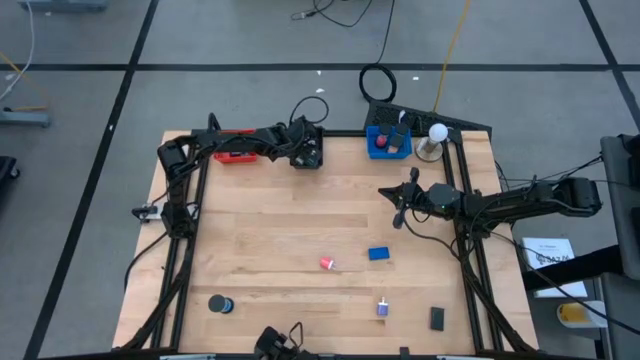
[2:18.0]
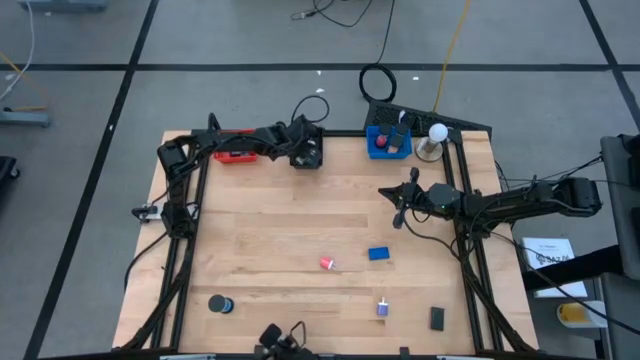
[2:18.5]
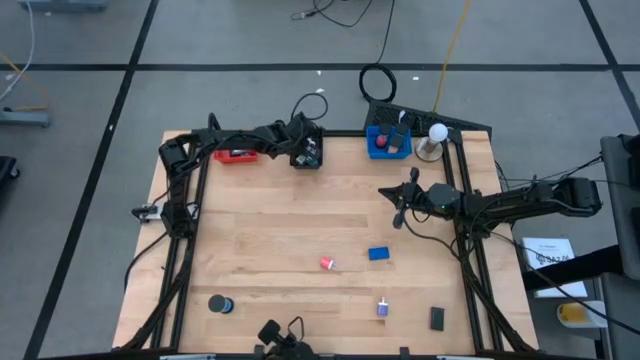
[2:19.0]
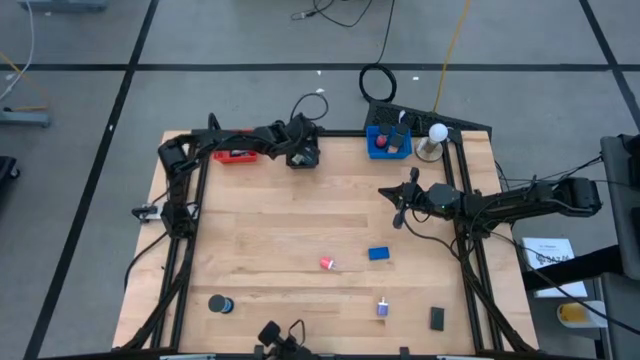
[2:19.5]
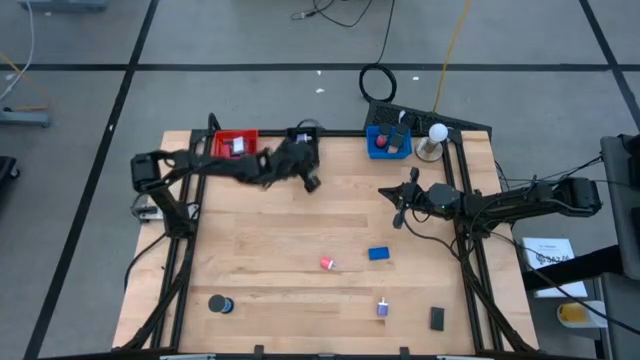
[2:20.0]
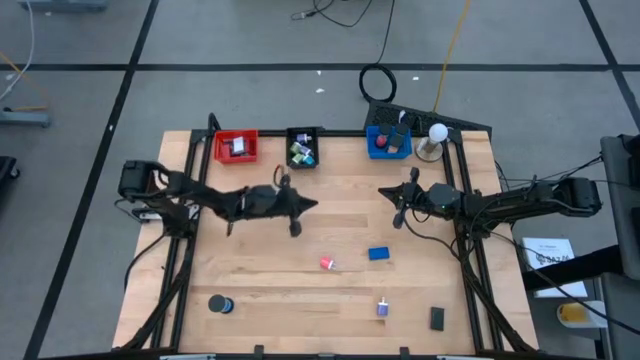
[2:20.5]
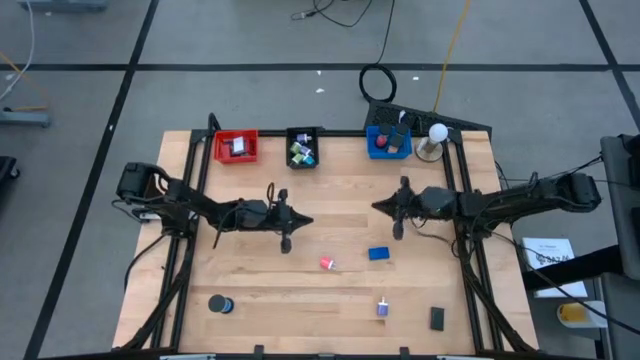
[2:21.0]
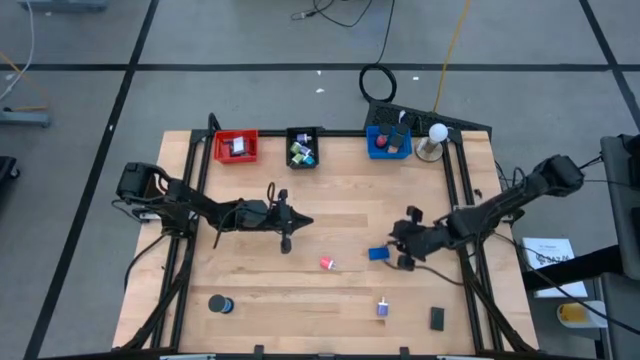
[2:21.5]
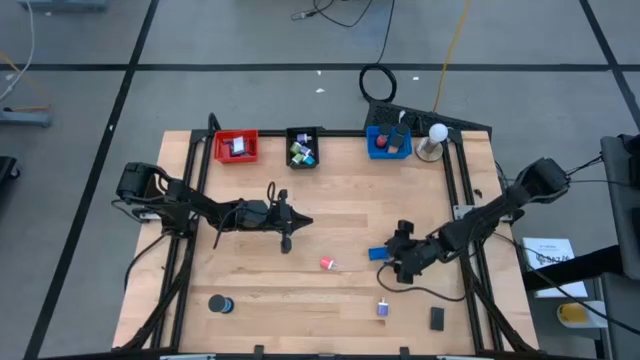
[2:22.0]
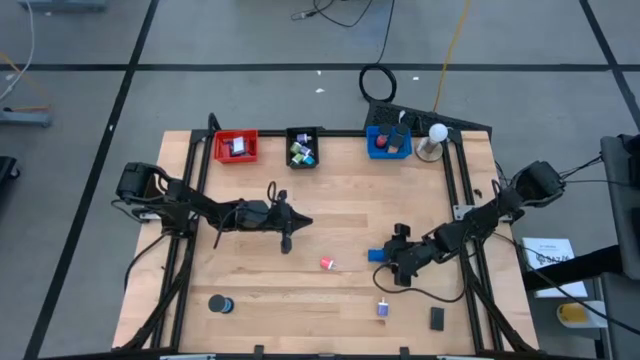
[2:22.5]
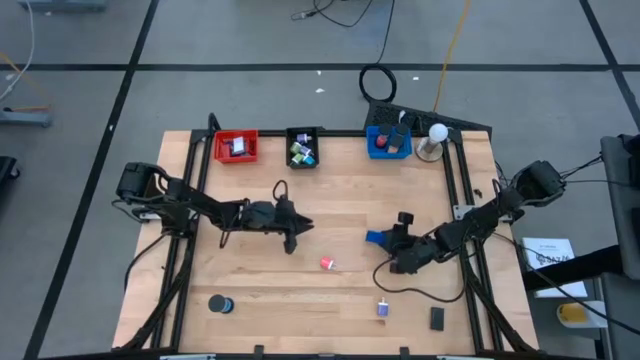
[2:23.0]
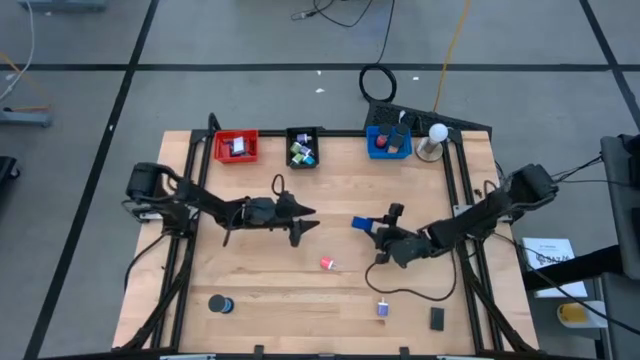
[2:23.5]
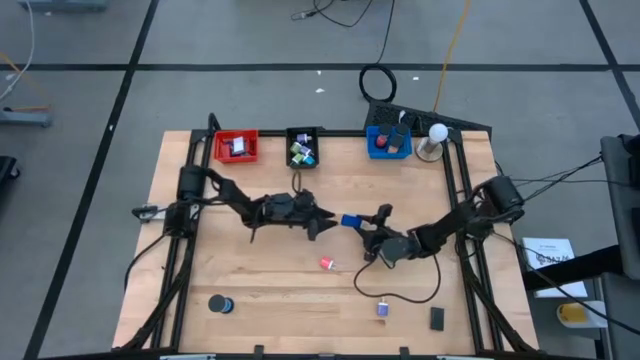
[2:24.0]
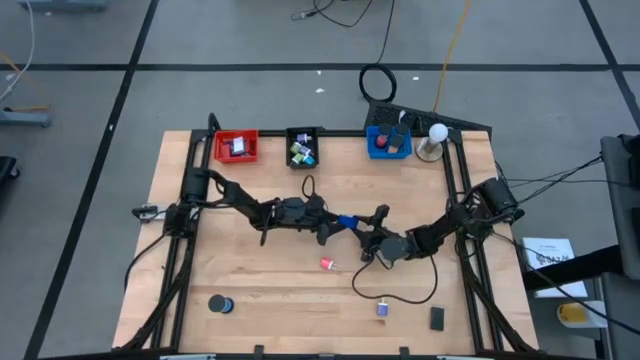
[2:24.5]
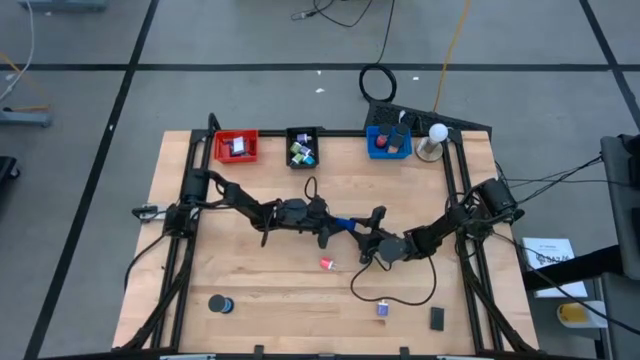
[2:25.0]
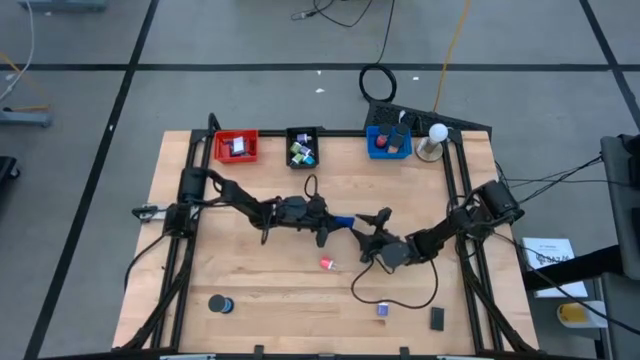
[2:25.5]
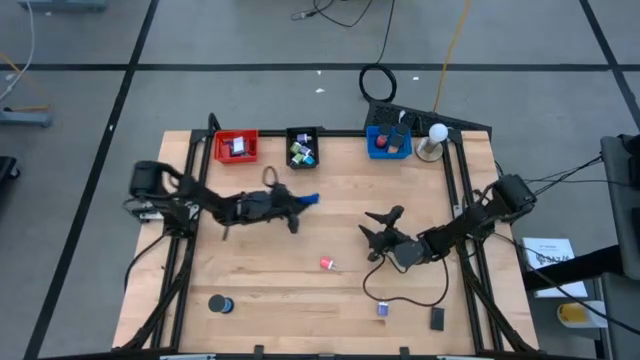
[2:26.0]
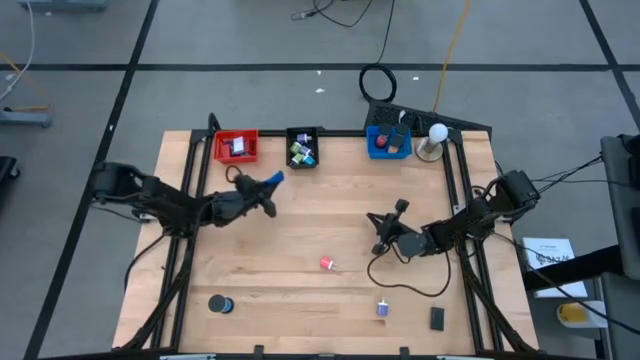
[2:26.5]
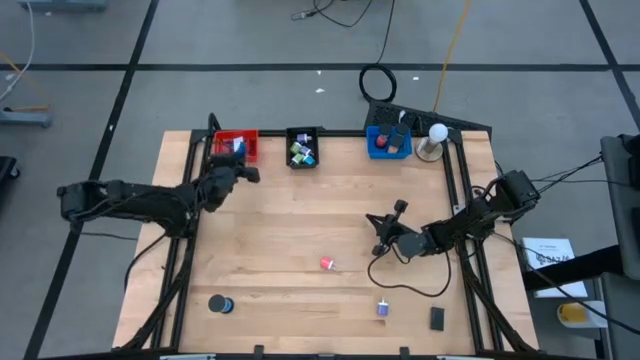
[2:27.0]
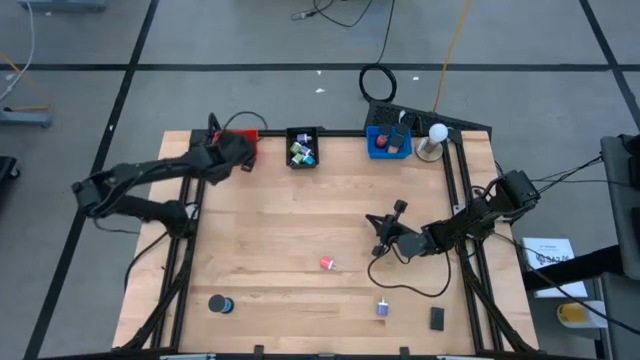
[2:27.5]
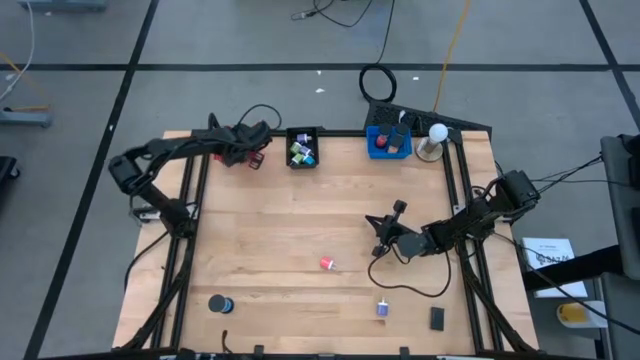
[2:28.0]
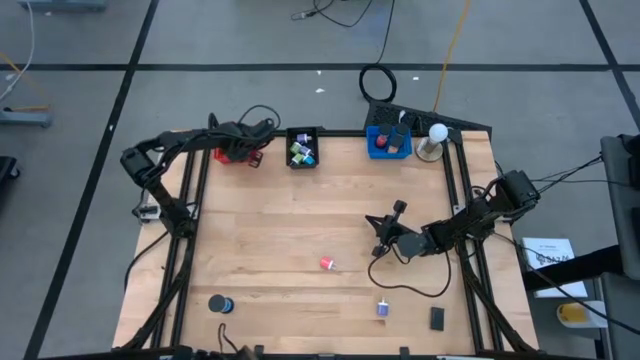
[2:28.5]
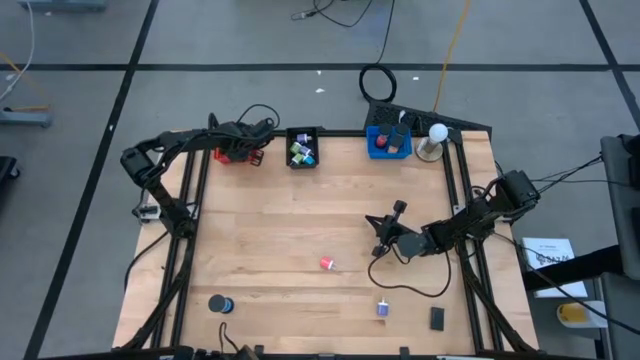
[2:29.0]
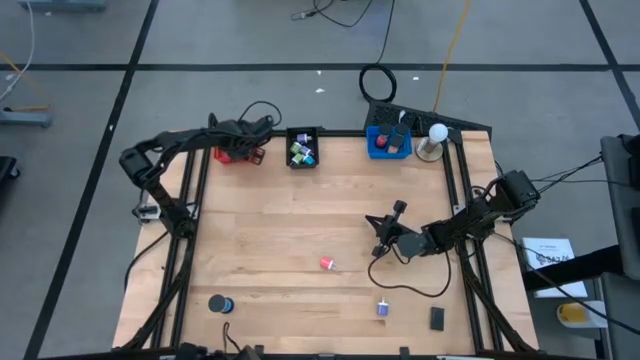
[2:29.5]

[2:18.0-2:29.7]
Task: Pick & Place Office items
Put the blue digital clock into the red bin

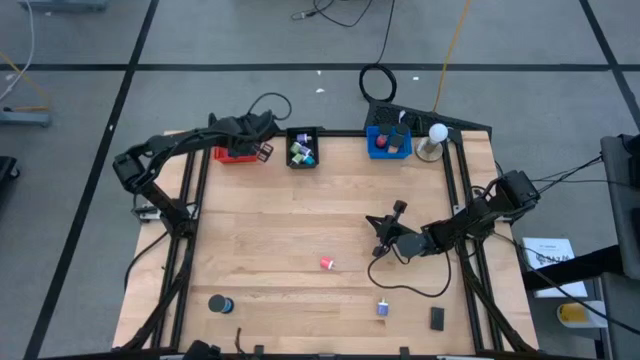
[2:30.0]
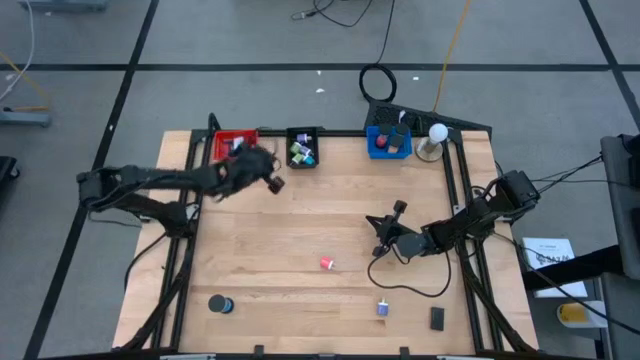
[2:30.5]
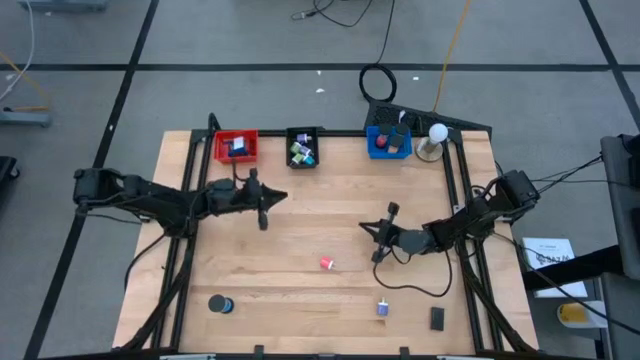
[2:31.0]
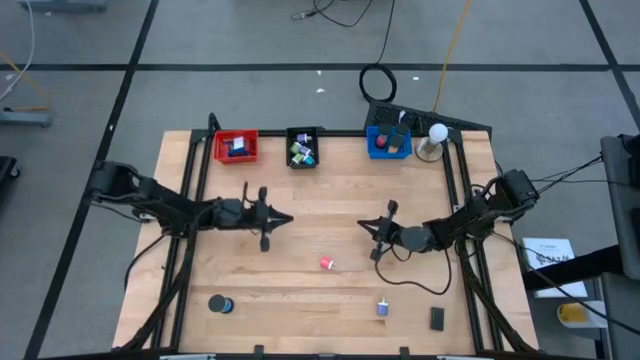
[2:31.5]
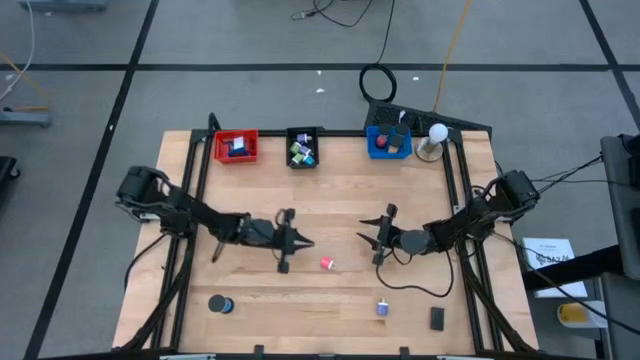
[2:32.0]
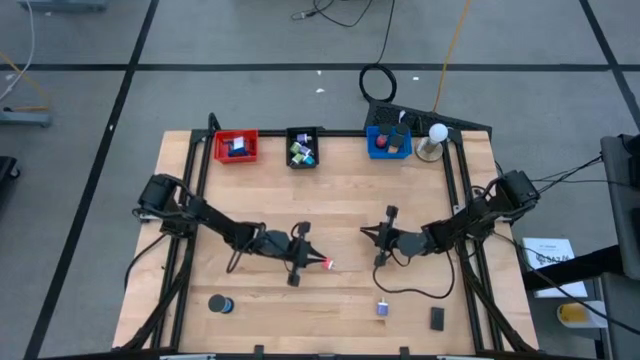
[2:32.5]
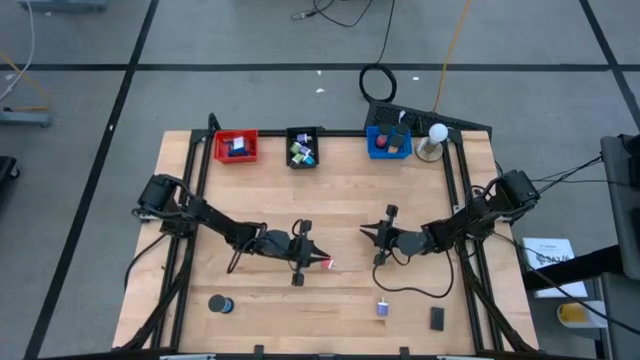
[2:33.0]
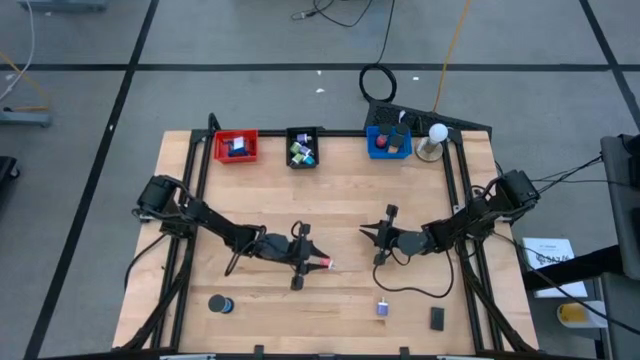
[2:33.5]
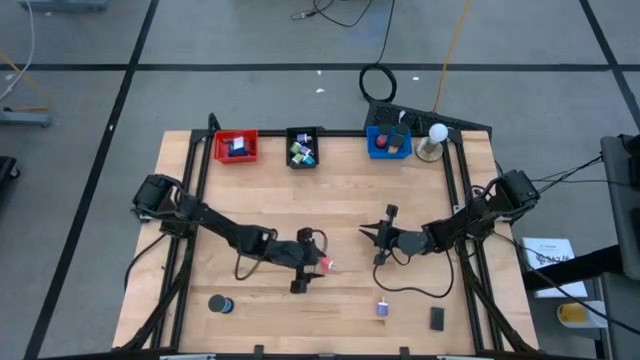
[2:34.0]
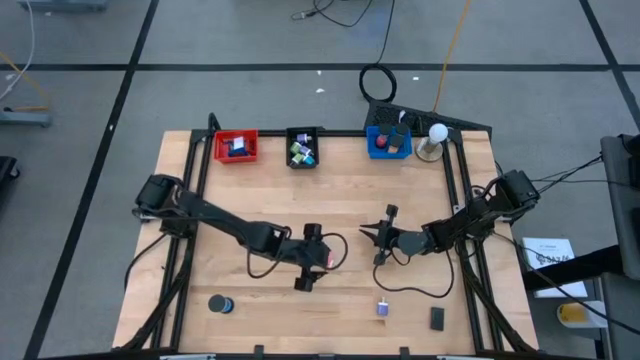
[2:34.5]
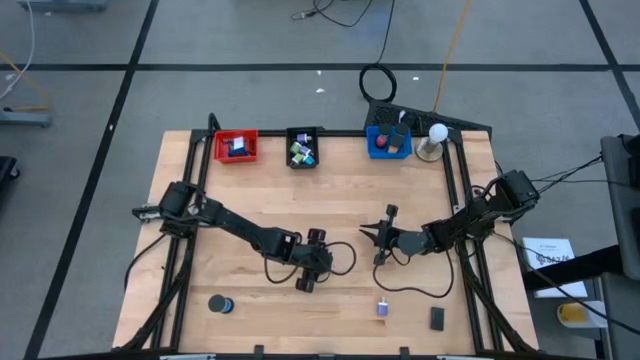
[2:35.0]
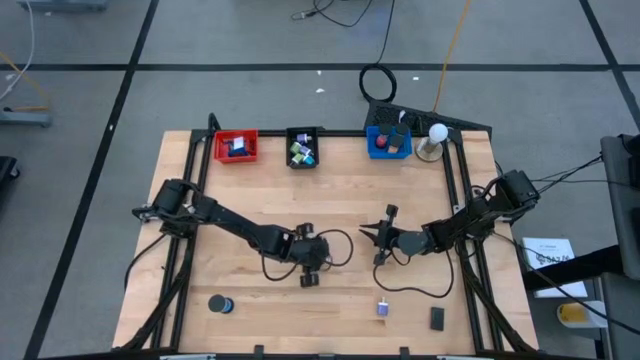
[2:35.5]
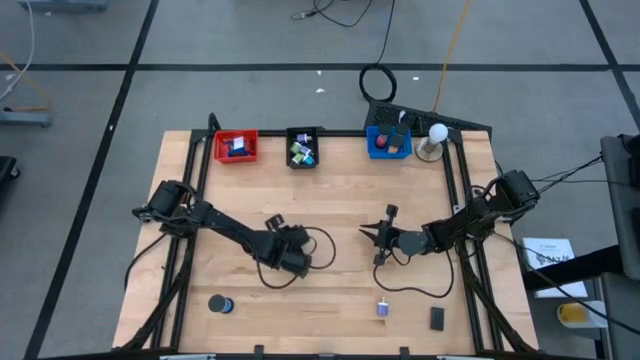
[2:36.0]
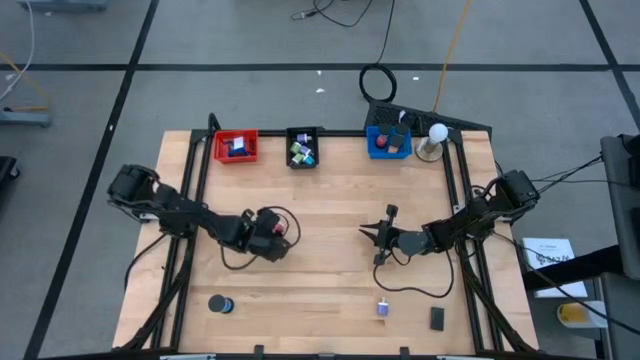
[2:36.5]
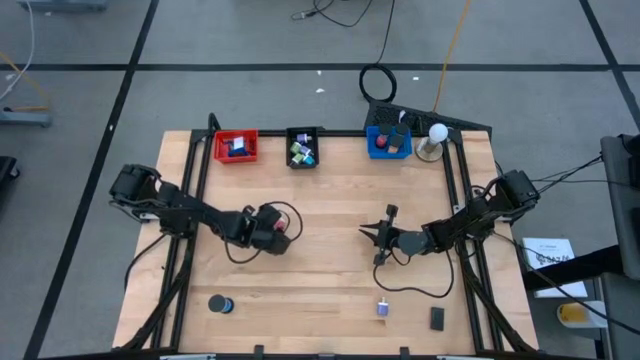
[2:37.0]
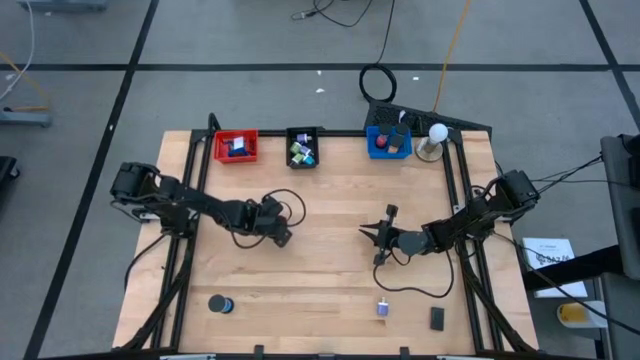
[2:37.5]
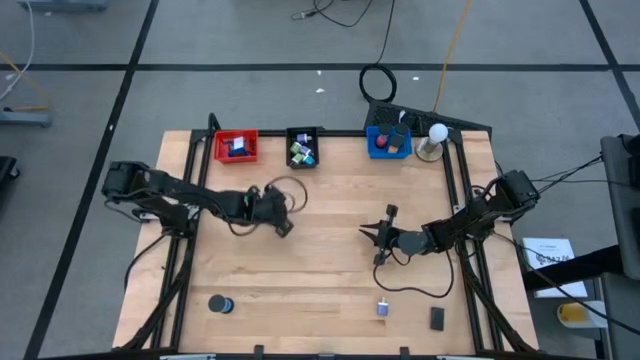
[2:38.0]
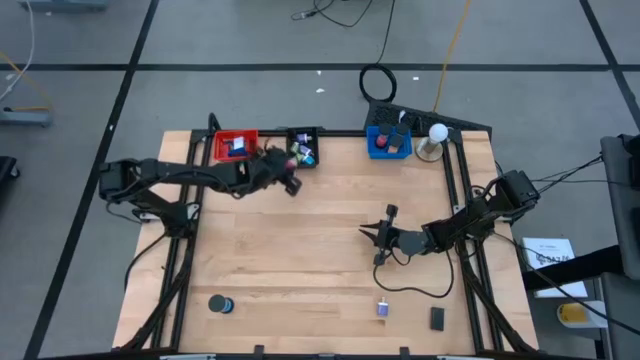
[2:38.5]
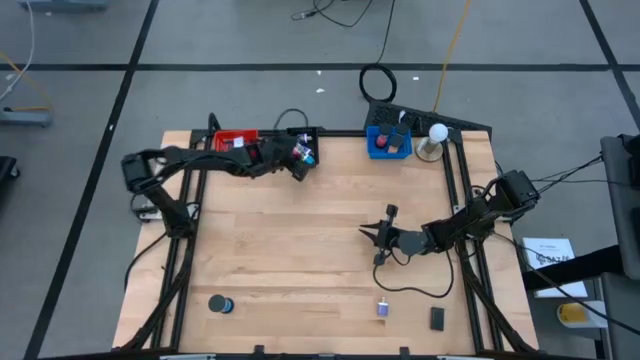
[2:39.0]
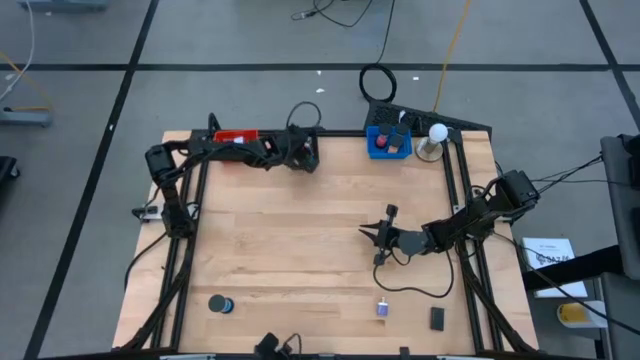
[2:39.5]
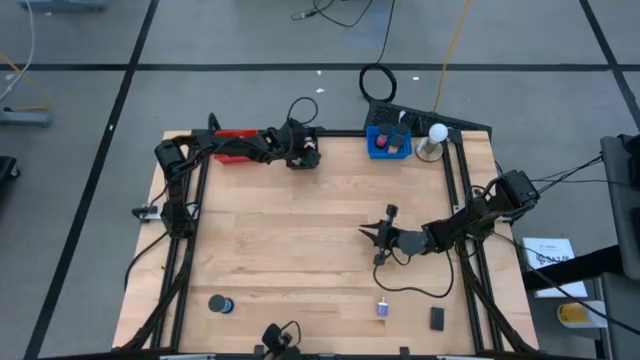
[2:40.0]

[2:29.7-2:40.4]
Put the red charger adapter head into the black bin
